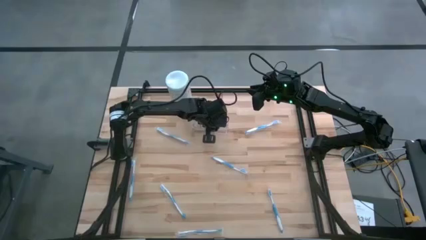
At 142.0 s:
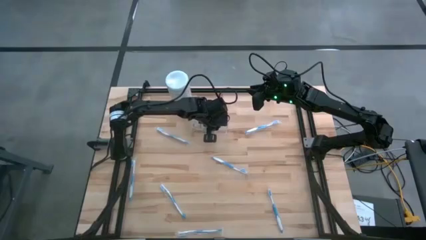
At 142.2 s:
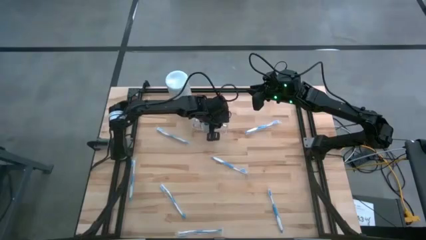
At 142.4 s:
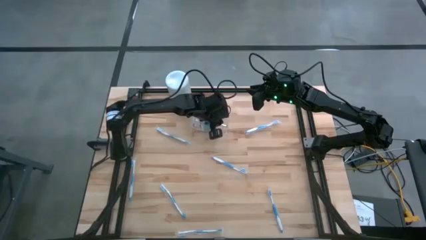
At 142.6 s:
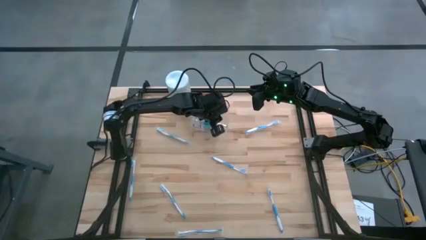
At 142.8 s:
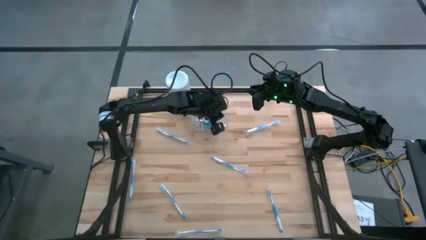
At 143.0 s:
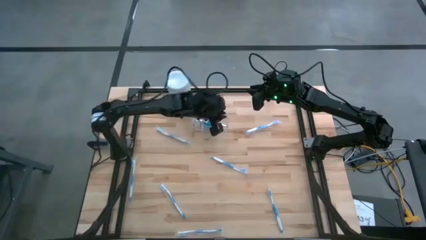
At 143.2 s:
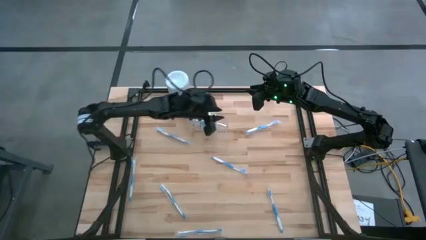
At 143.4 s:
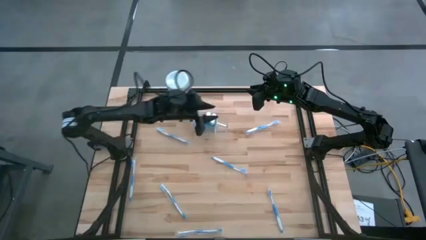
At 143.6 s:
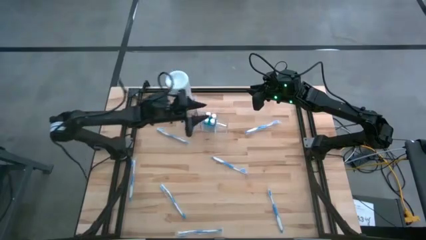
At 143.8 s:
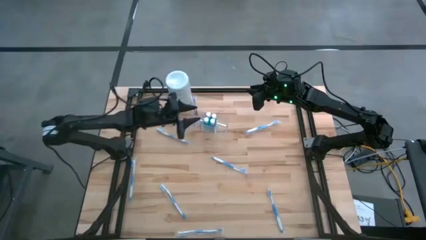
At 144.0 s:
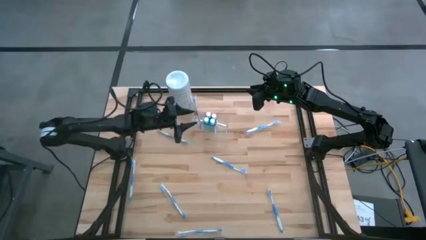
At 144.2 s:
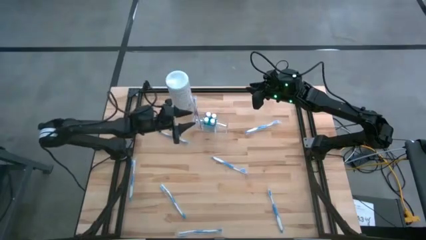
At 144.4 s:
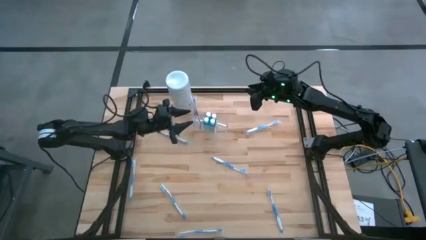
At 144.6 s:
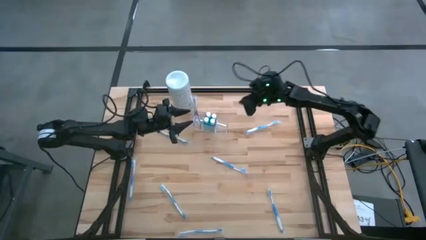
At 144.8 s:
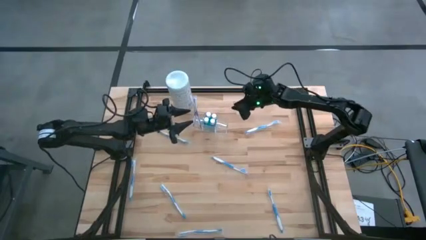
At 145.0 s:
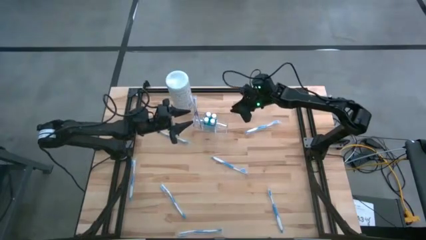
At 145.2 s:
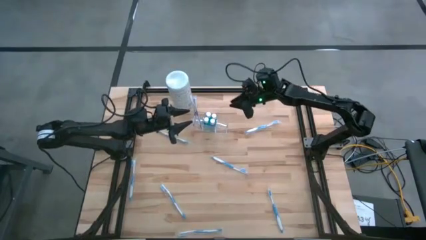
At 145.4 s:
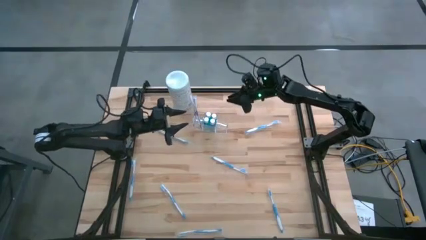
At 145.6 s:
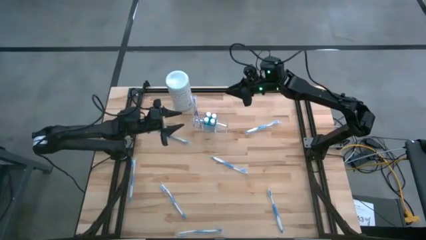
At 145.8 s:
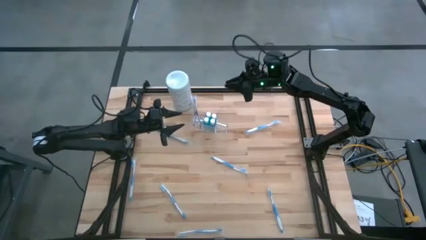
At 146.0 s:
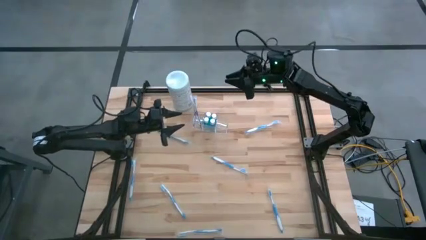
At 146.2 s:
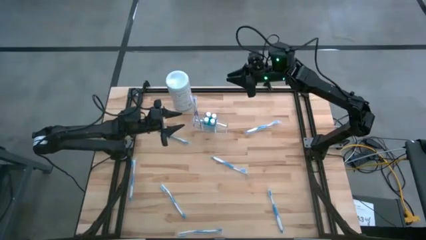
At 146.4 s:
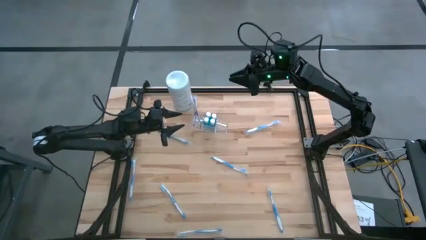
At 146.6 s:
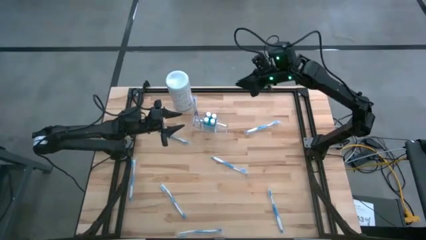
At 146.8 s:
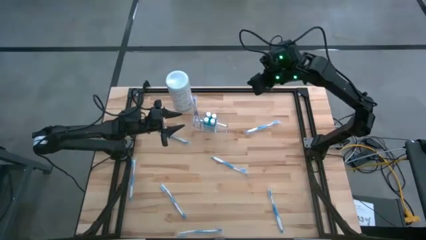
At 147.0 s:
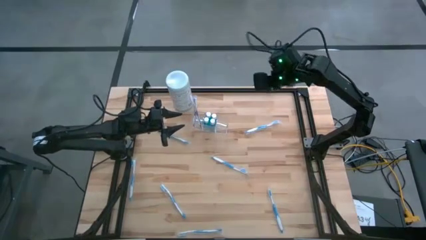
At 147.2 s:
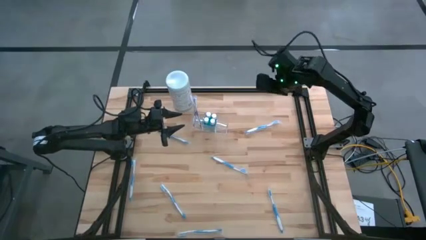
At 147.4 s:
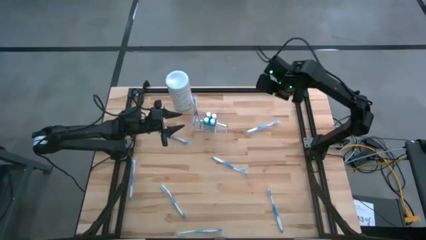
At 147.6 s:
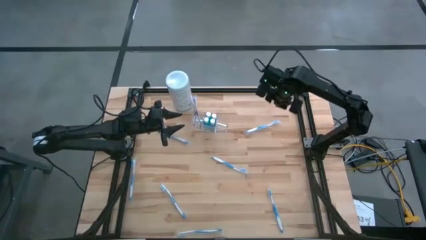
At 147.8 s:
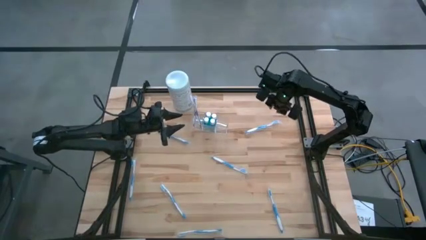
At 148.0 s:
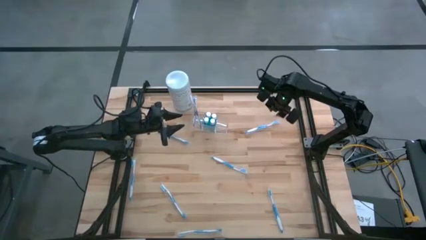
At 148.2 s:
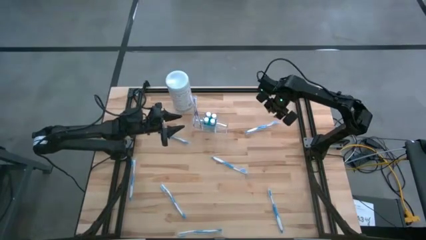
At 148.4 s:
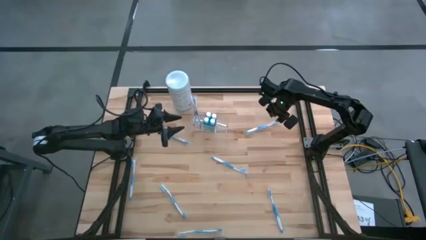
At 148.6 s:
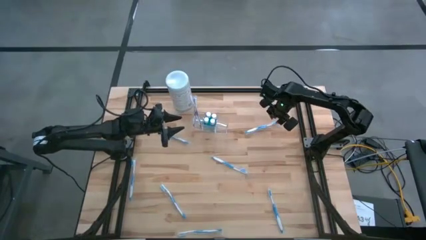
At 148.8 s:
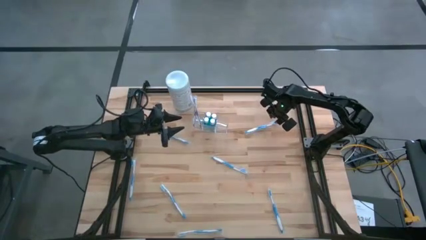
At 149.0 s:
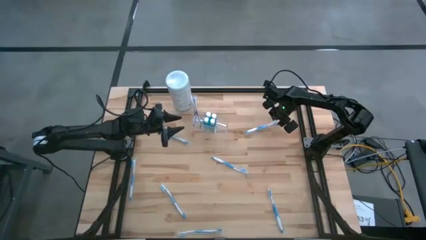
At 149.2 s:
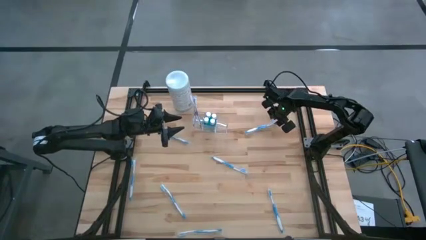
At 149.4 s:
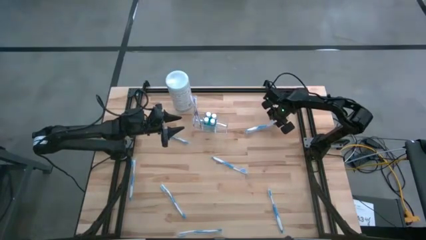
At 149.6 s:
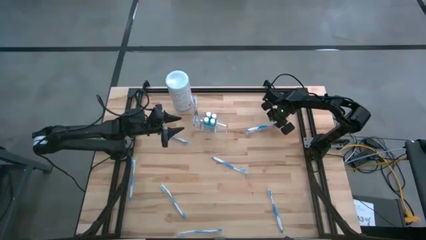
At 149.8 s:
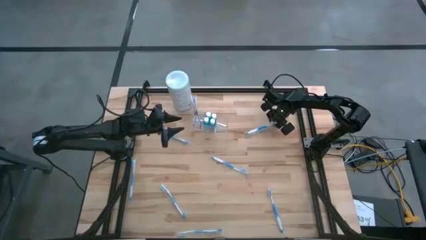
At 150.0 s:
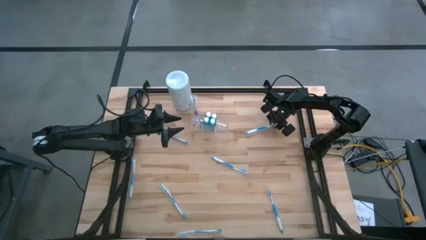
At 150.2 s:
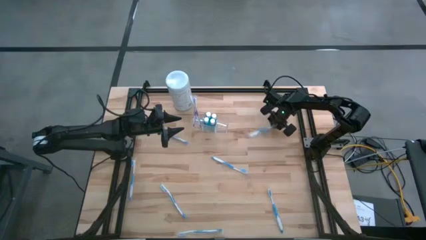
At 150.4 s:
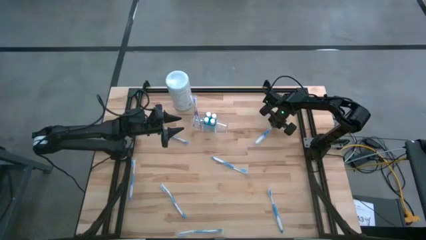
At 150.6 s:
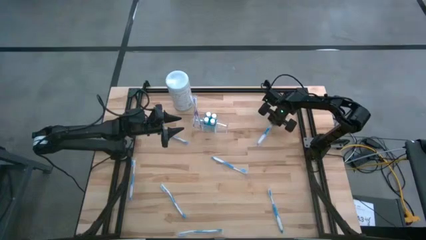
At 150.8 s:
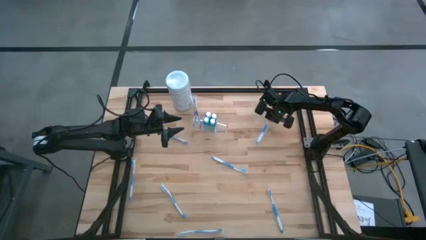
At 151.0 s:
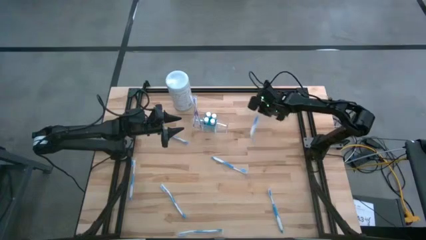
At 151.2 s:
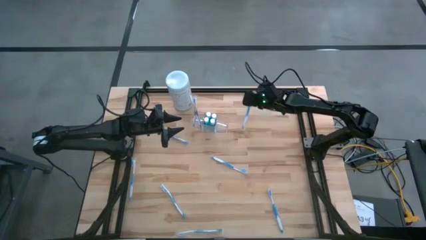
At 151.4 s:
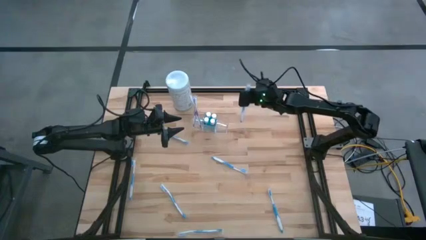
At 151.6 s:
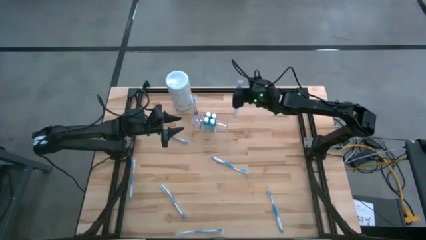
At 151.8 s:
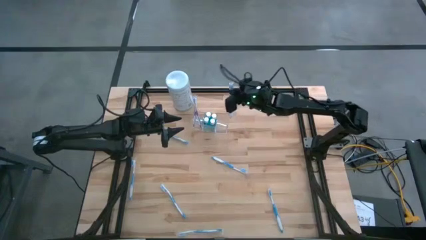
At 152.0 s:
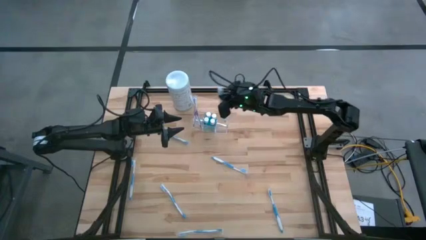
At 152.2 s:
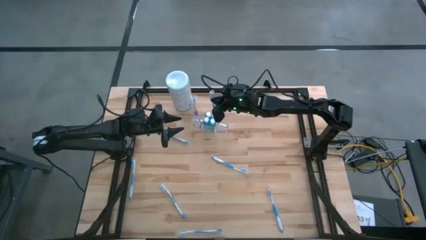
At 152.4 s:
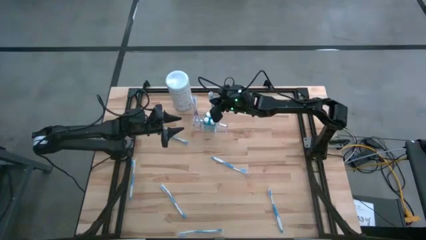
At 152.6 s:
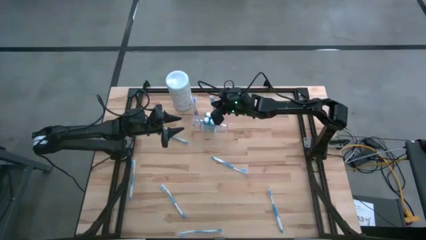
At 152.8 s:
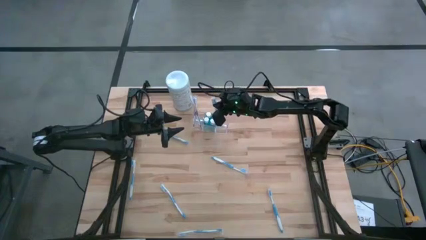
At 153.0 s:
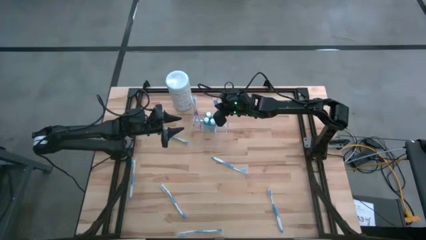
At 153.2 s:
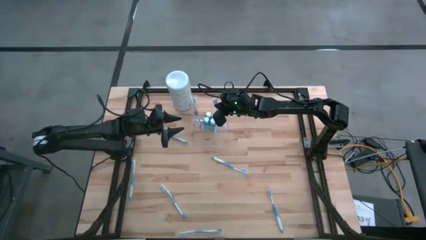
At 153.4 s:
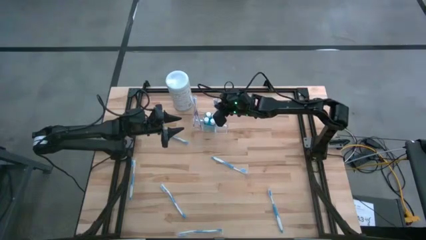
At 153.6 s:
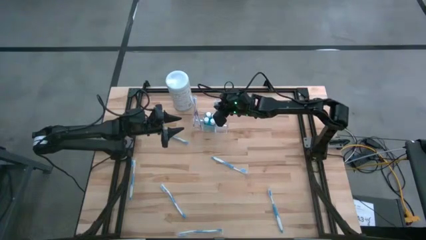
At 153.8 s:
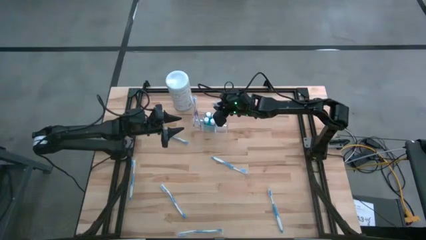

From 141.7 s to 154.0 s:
Task: Pick & Place toothbrushing station
Put the blue toothbrush into the right of the transparent organizer

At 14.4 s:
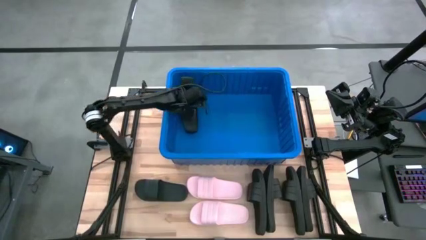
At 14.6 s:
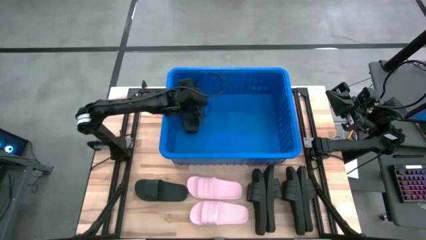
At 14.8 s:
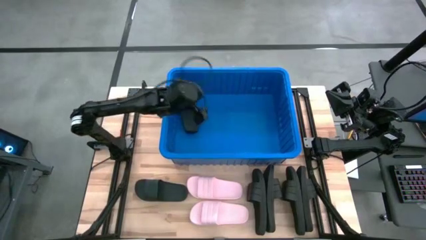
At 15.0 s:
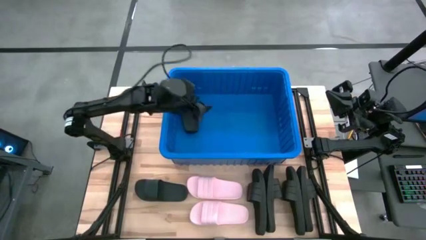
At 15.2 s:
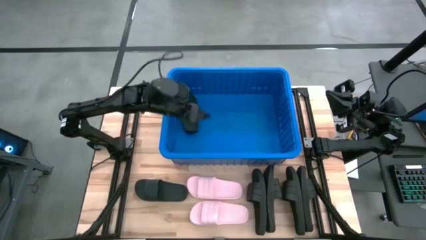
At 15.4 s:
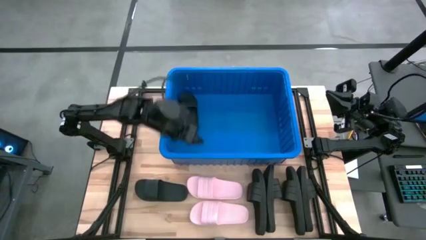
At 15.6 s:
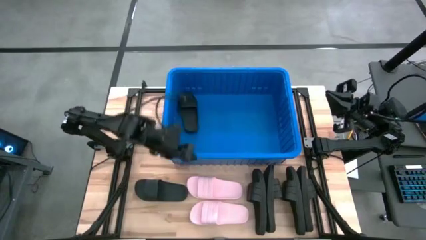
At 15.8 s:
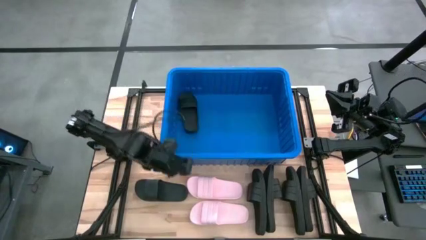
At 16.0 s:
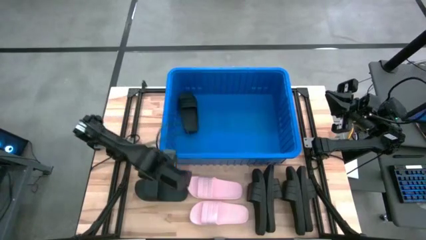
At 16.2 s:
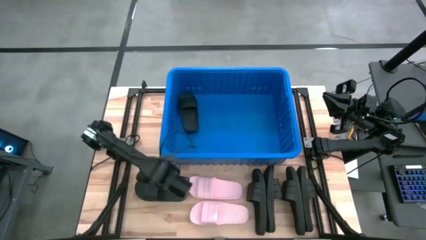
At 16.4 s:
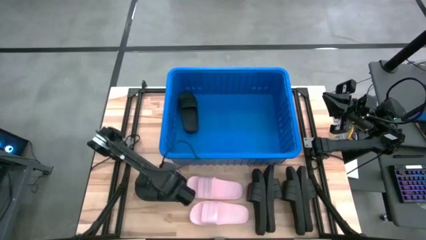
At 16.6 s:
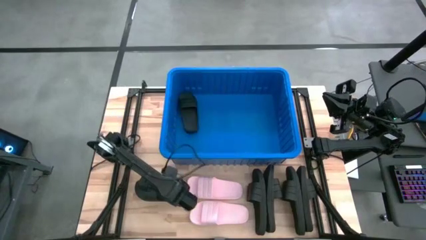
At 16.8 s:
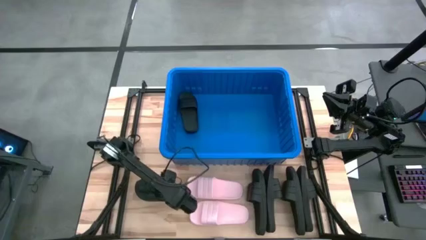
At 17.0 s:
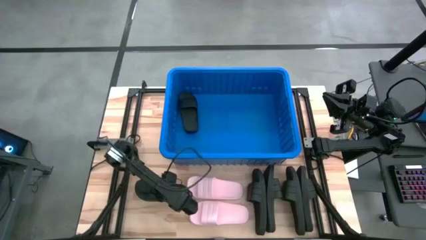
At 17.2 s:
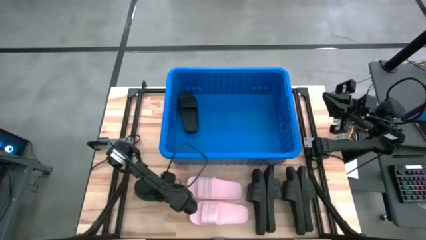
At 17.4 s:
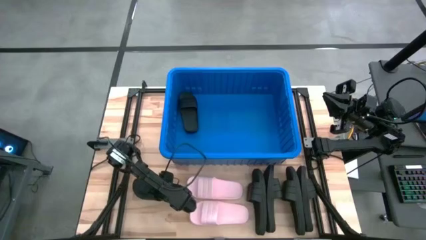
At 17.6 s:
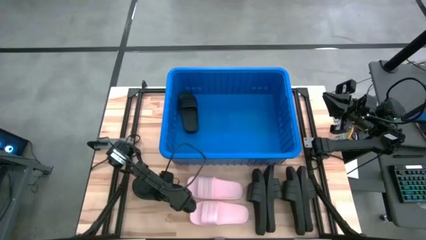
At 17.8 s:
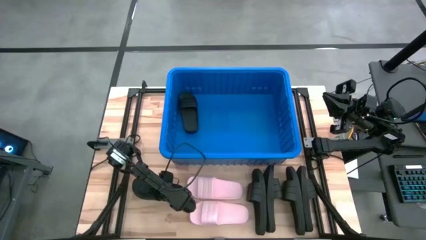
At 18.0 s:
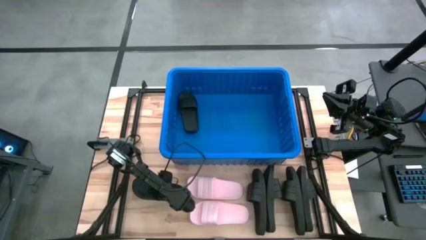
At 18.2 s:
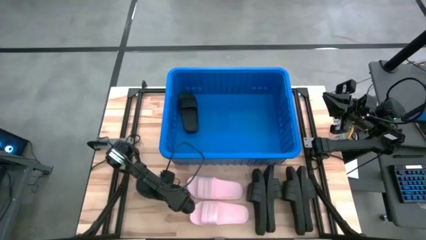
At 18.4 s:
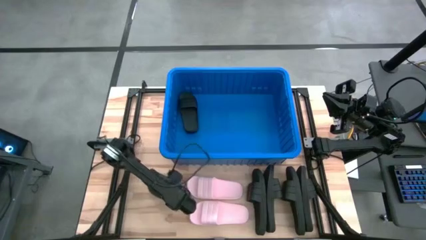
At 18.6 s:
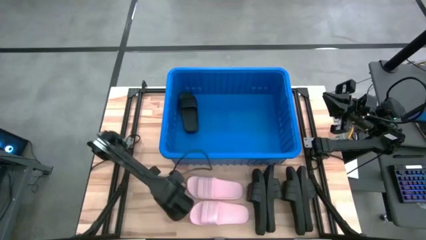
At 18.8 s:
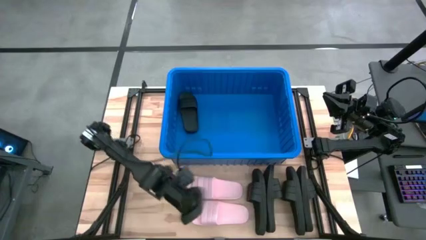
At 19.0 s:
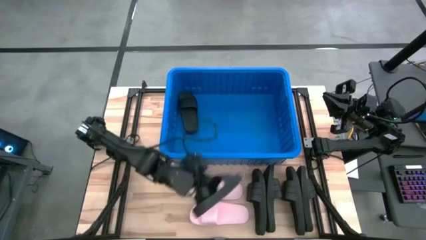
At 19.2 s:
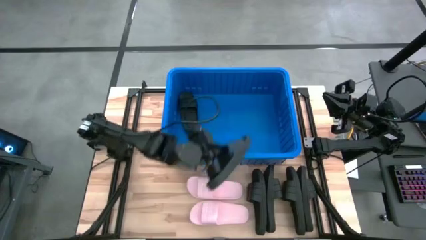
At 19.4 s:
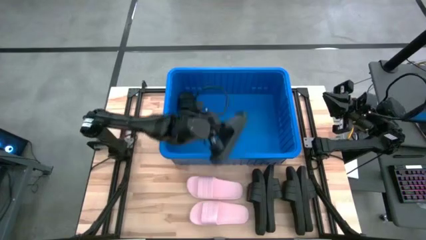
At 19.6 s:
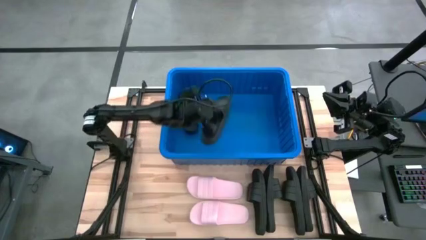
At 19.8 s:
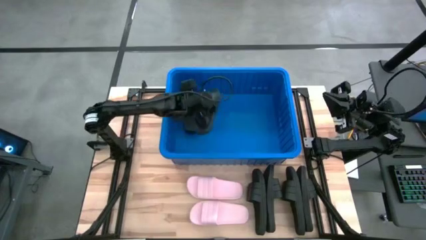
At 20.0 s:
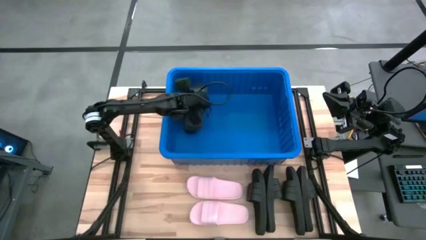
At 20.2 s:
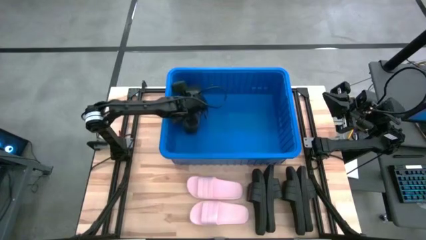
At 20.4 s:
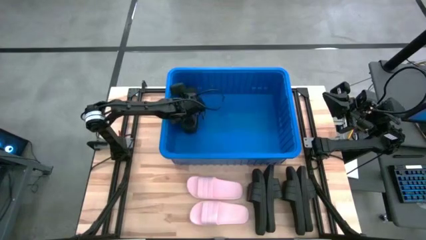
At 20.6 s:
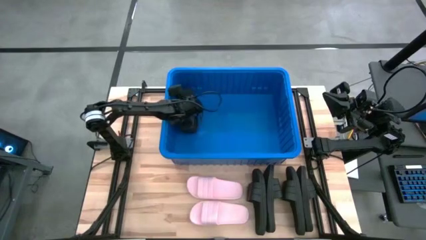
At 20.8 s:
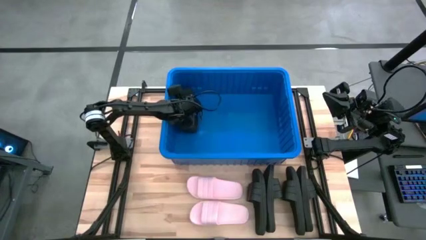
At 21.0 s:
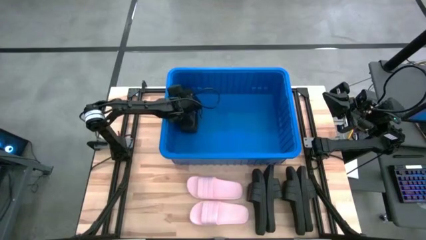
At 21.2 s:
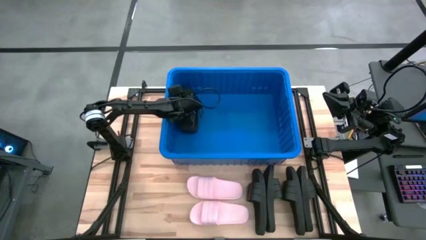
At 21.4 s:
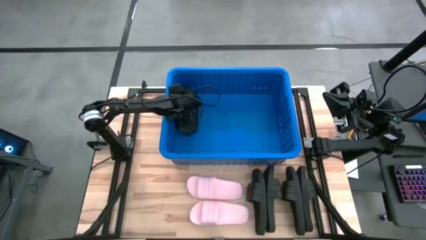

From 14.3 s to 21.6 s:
Task: Pick and place slides into bin
Put the black slide into the blue container
